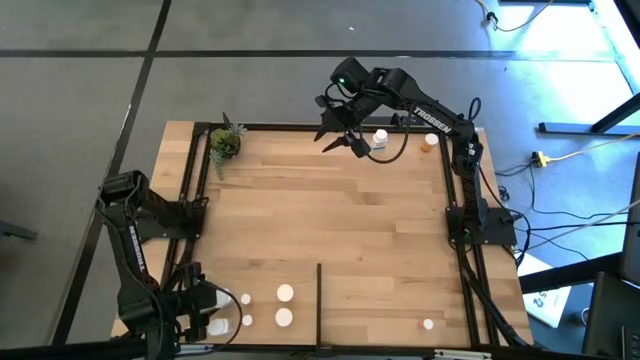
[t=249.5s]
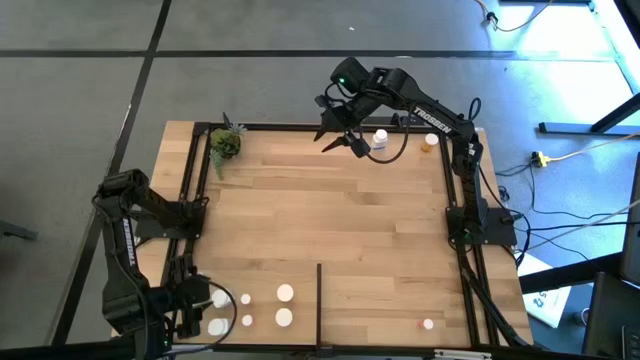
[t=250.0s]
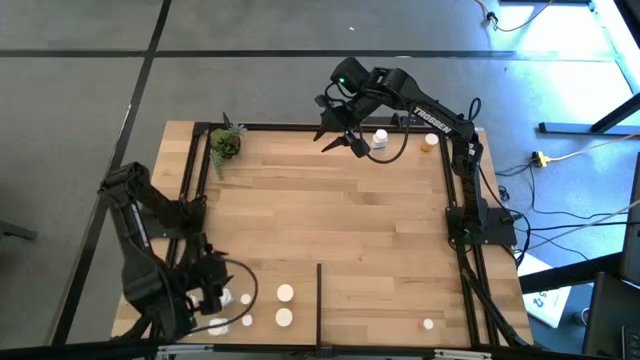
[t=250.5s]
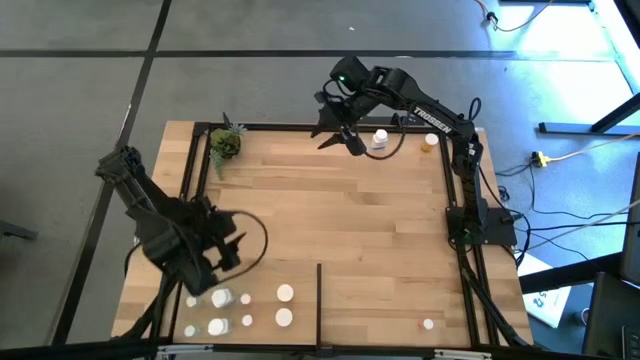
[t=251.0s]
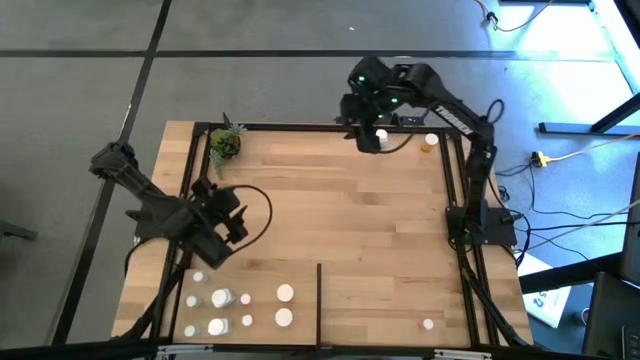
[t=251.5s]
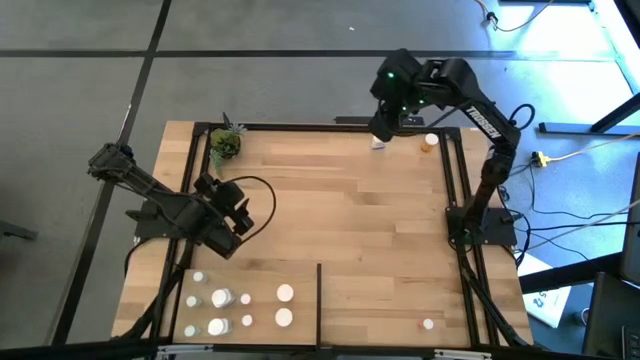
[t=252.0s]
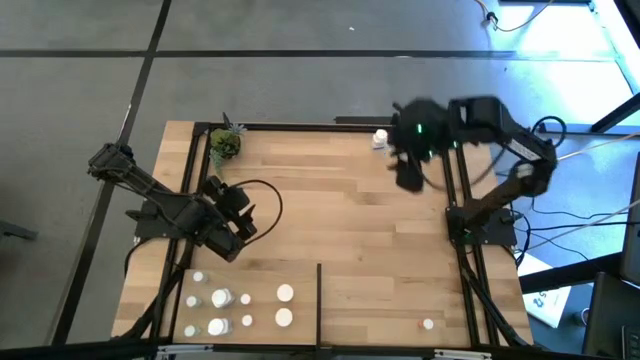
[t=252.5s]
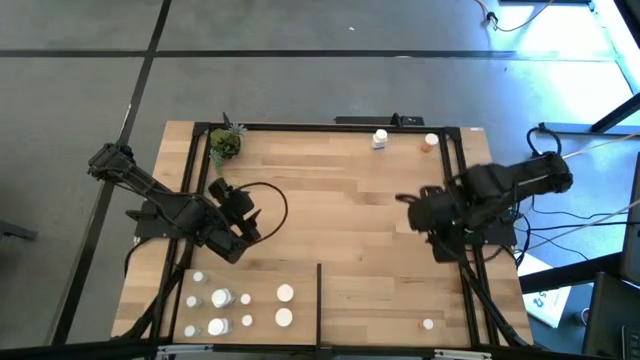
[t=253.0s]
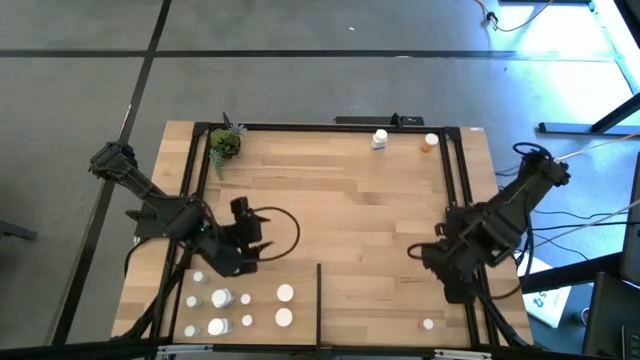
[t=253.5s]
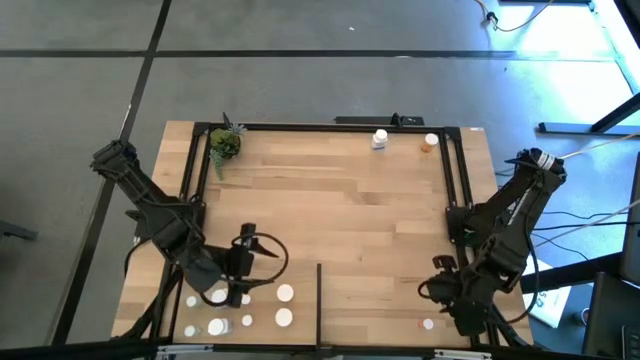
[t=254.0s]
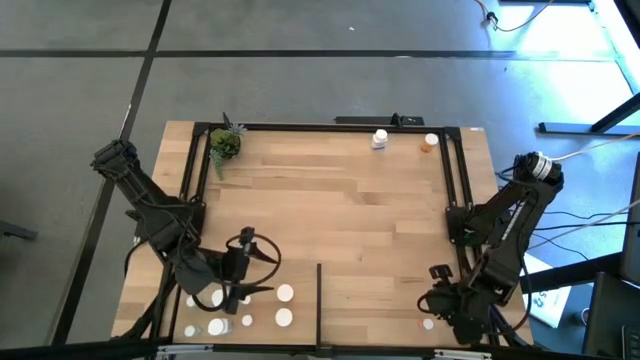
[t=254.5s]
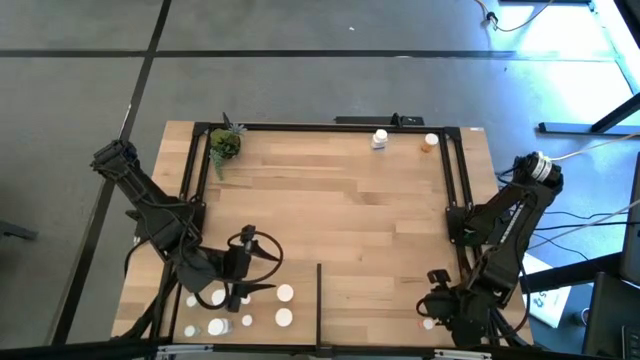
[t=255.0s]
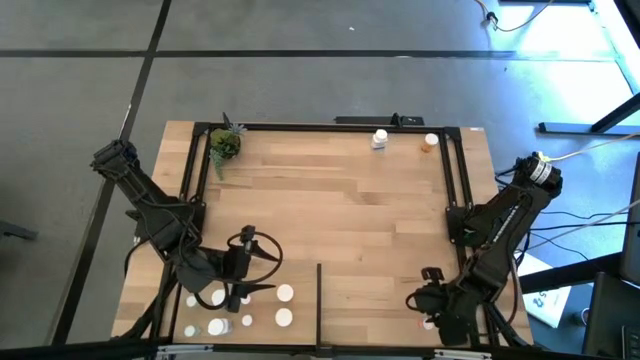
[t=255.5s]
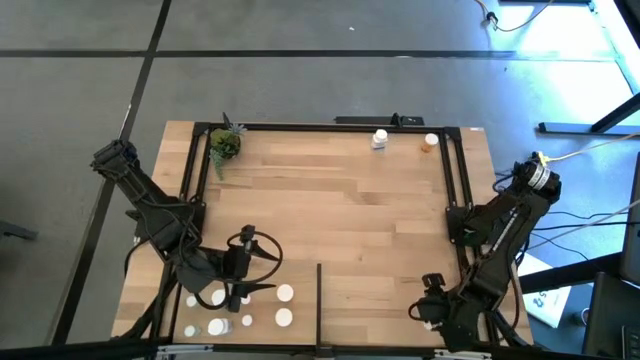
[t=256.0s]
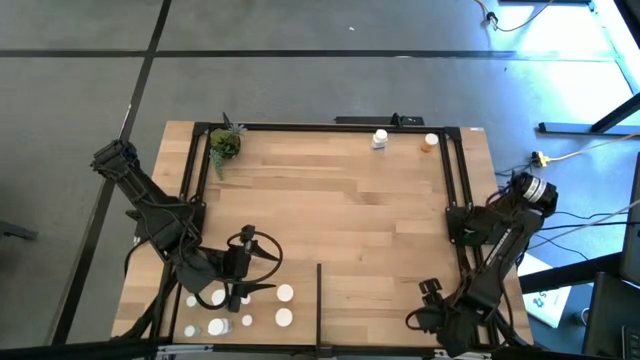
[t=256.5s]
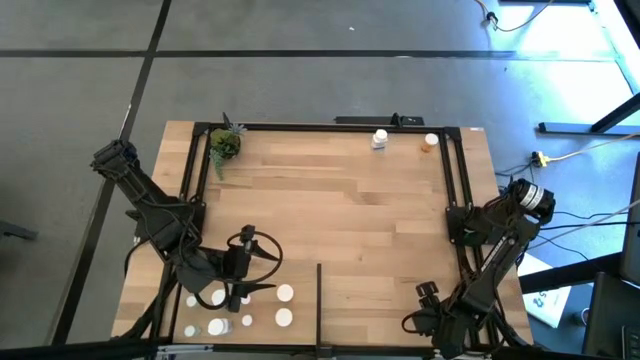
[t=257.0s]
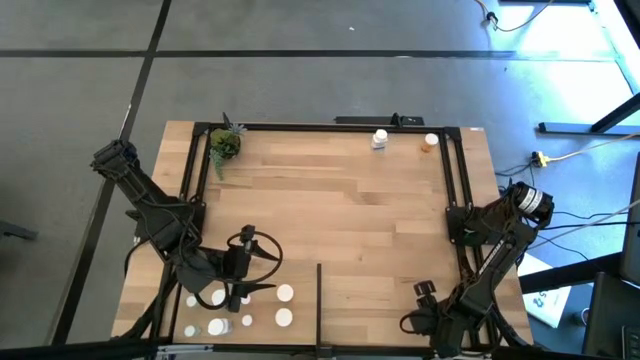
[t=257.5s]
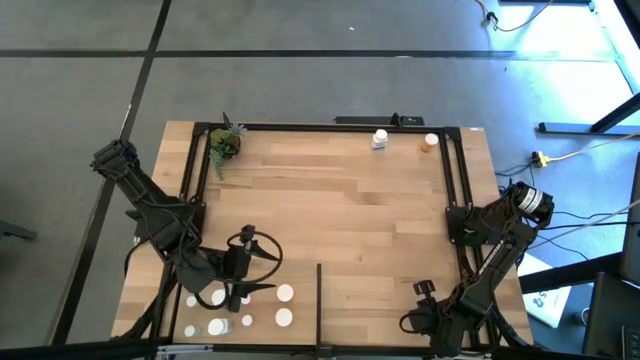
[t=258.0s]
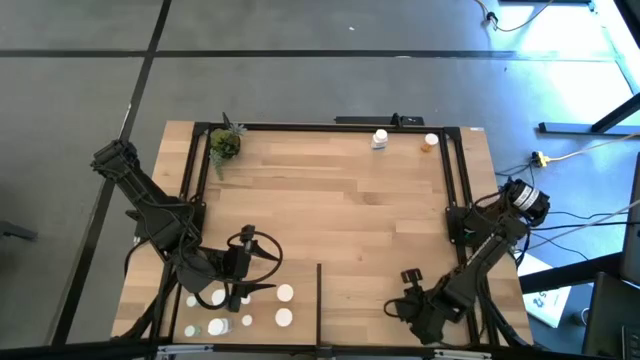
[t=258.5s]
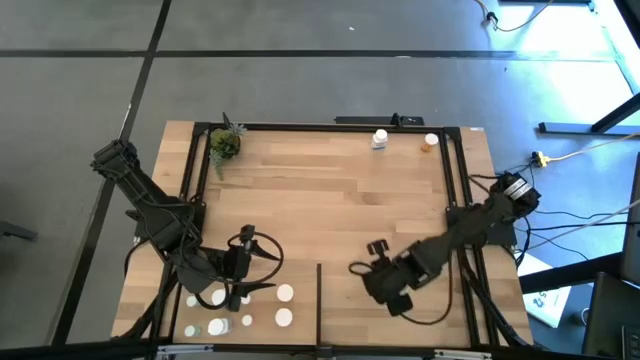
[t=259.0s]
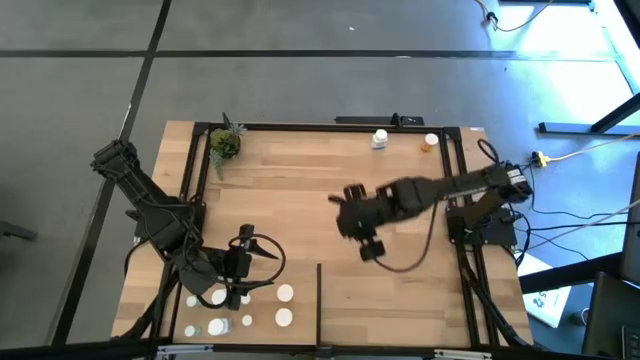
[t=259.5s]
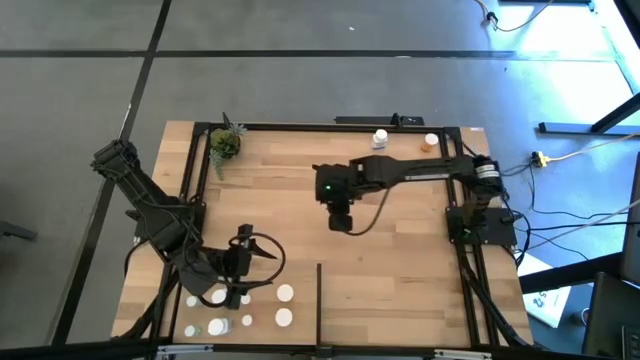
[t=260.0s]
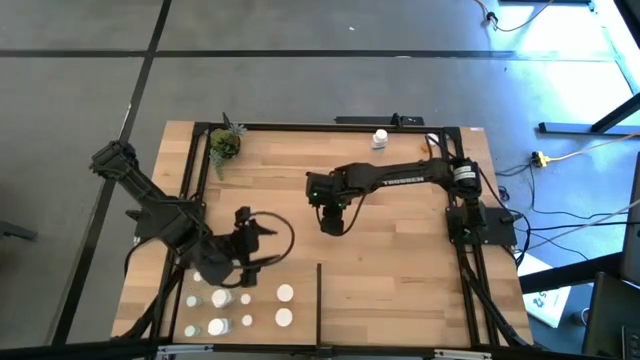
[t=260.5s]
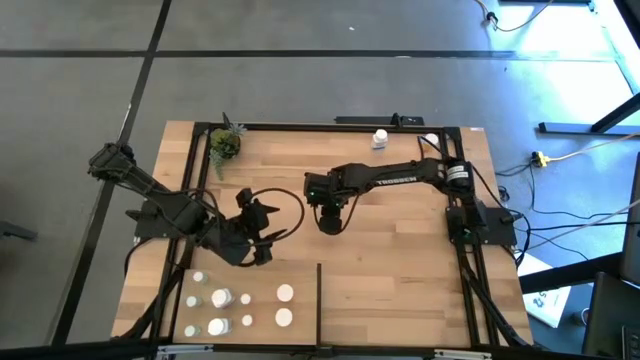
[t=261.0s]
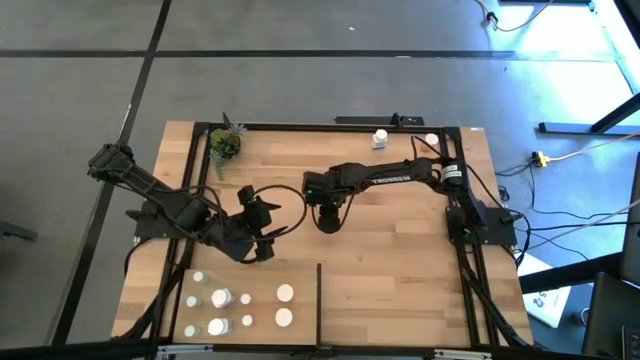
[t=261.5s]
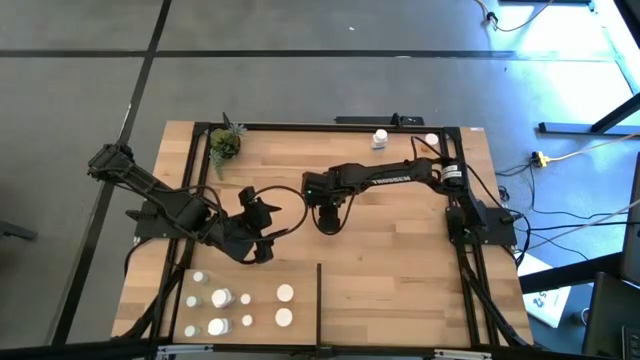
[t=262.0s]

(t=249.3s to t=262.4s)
Task: Pick and place medicine bottles onto shelf by color
Put the pink pill bottle on the shelf aligned with the other pink pill bottle

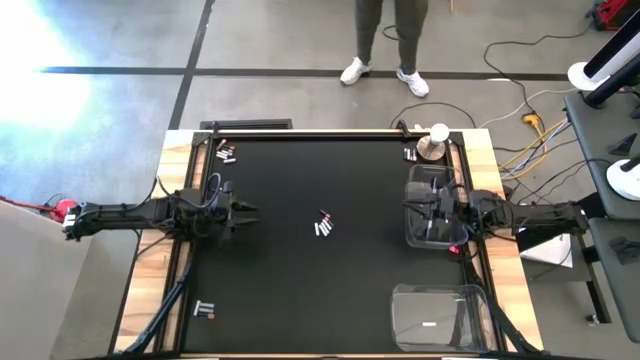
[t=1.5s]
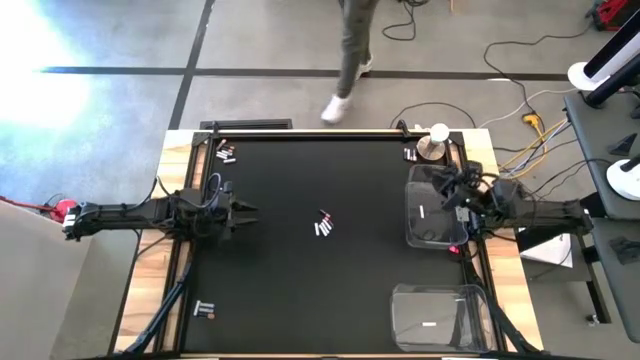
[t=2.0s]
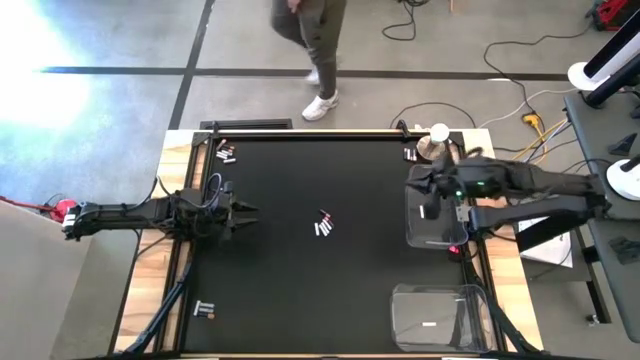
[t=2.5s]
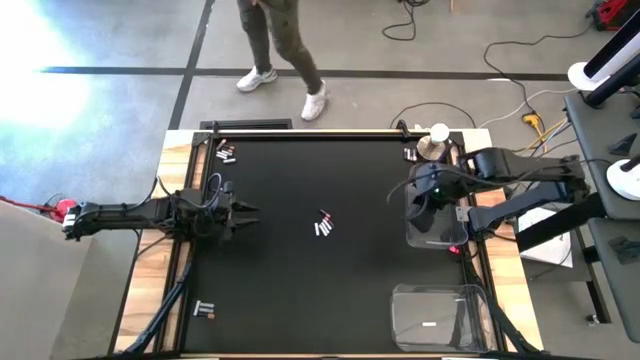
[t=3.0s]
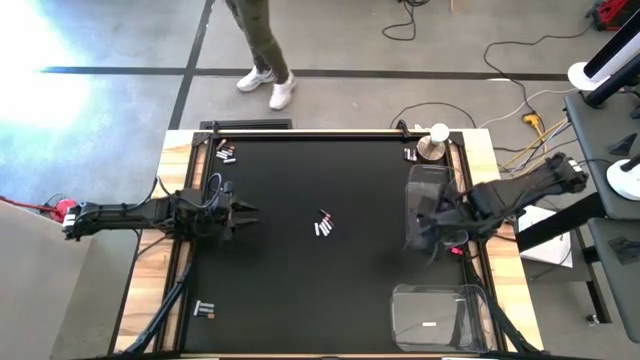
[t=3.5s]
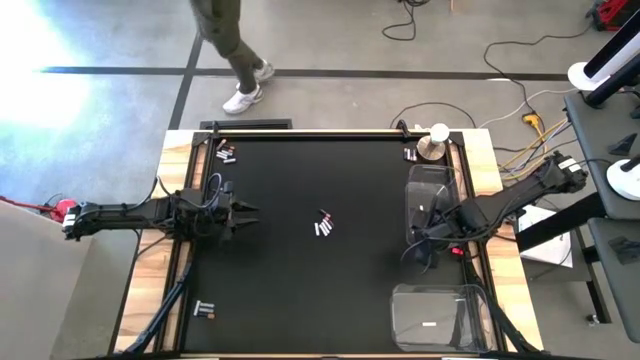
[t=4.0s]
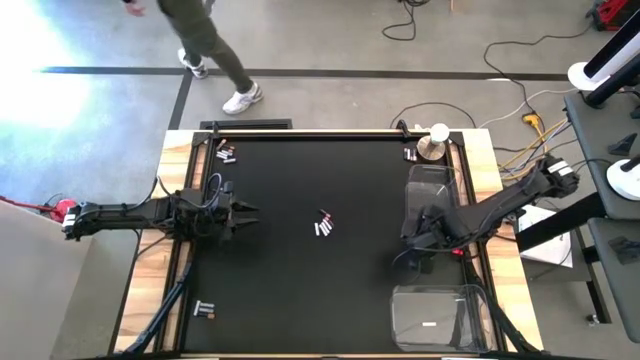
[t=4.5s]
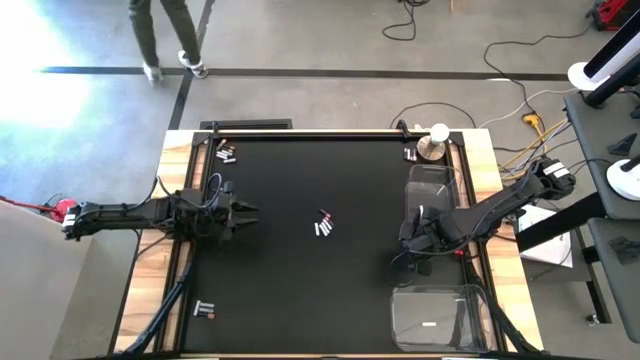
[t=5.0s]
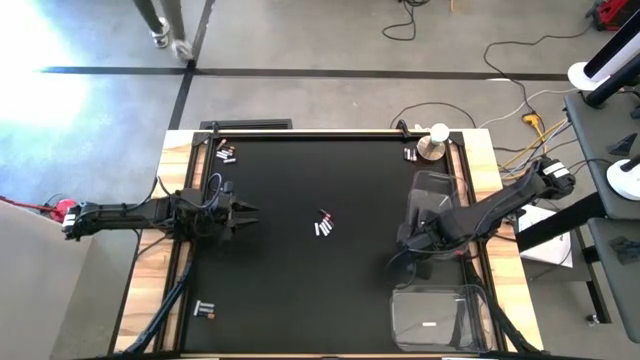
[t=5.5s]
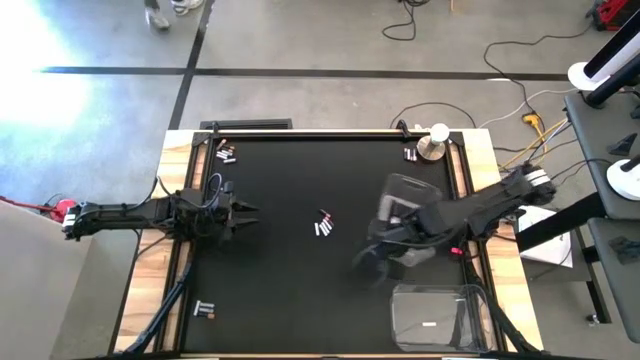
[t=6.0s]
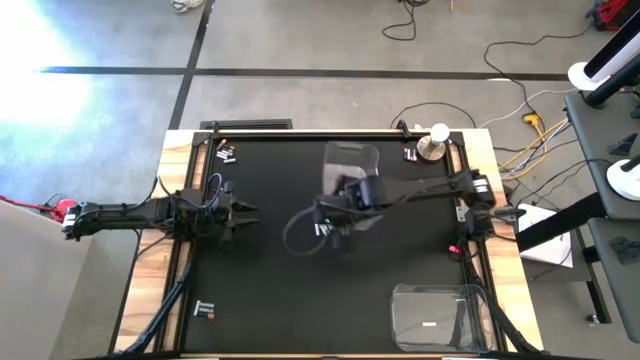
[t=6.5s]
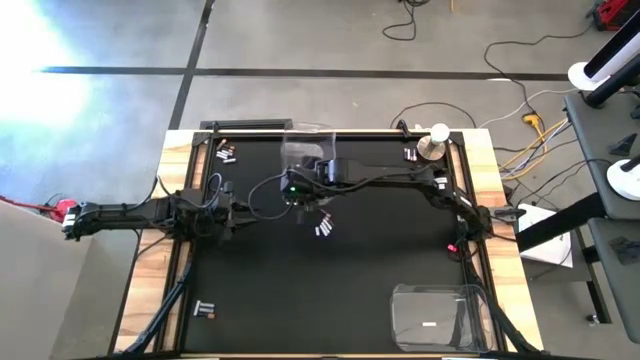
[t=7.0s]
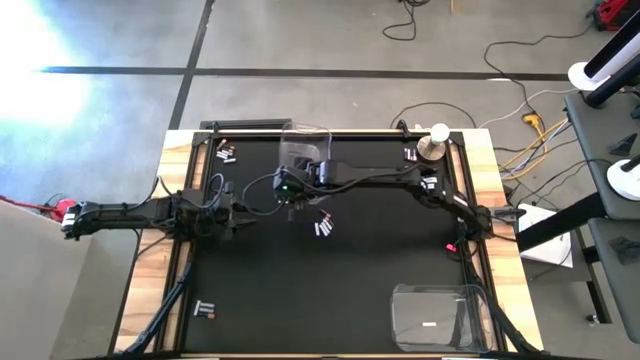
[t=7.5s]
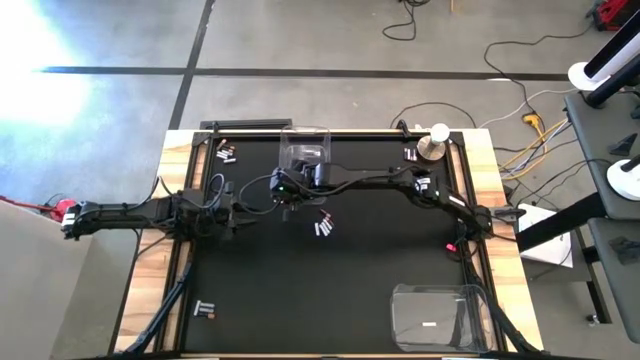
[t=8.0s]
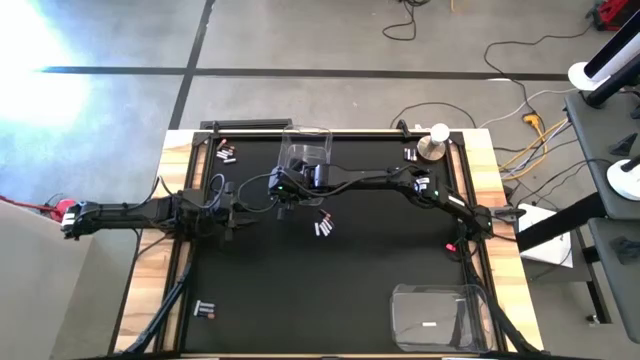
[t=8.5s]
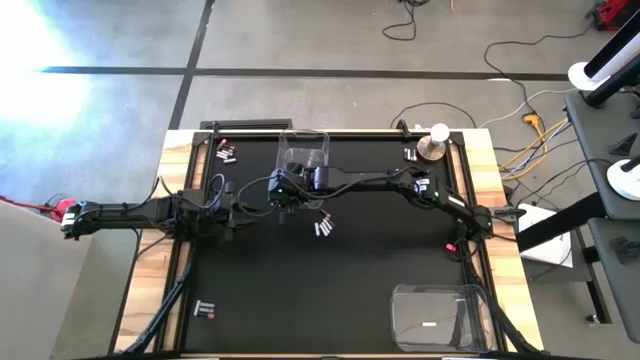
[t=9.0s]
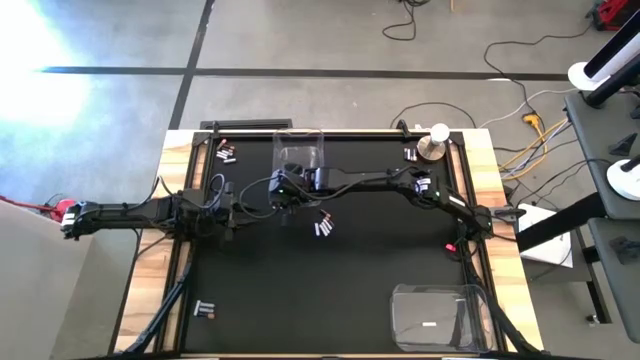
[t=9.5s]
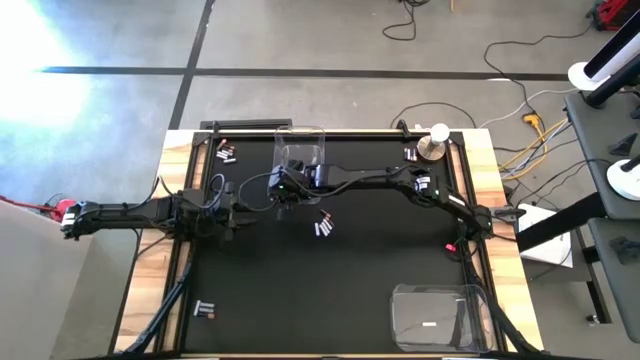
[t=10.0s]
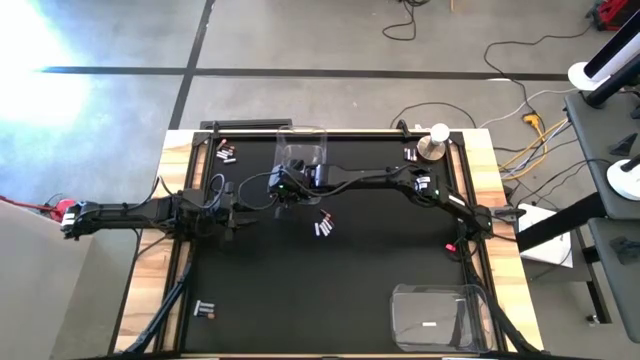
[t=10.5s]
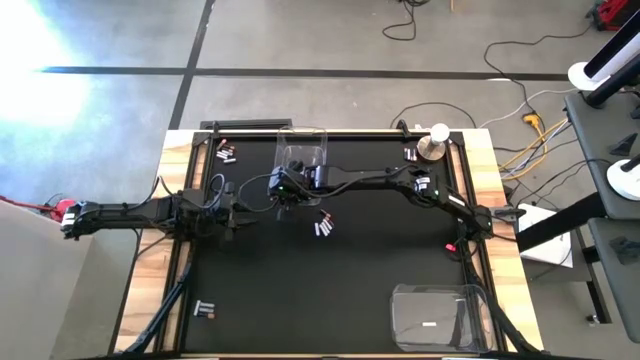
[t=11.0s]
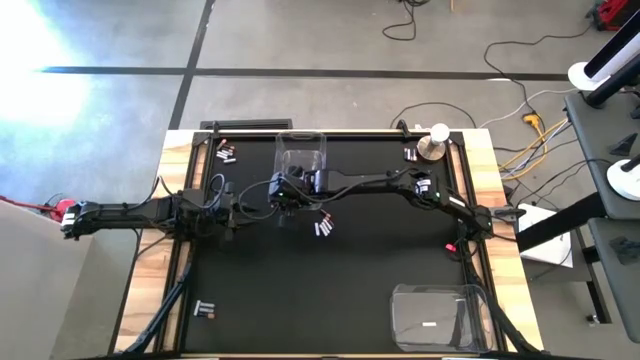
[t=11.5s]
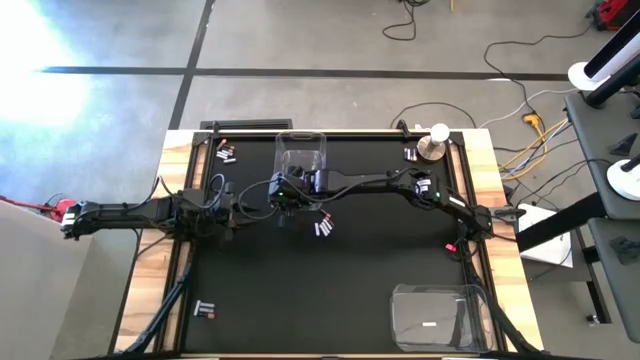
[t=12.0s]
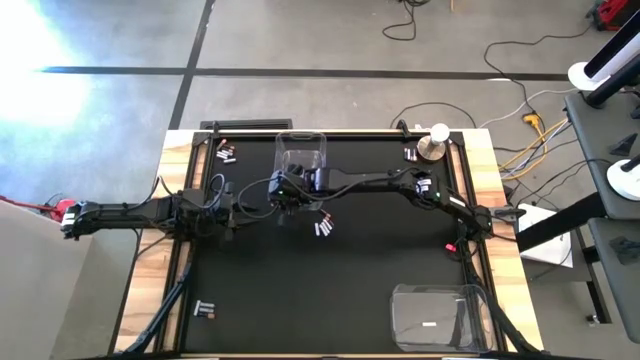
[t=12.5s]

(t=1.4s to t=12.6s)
Task: Sort batteries
Move the top transparent bin to the top left
